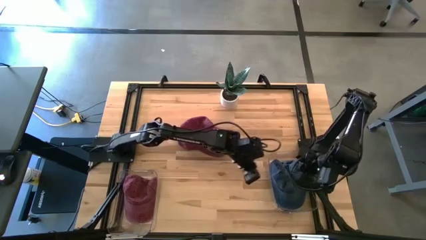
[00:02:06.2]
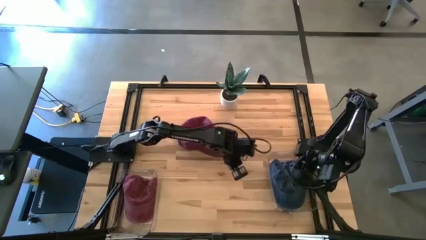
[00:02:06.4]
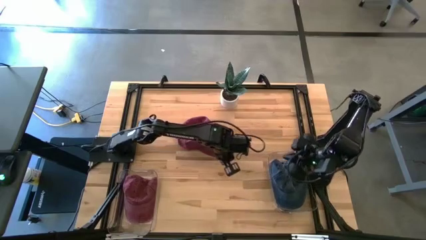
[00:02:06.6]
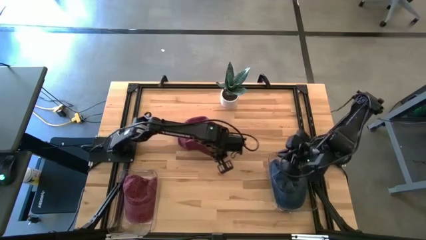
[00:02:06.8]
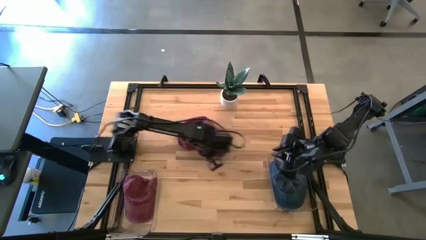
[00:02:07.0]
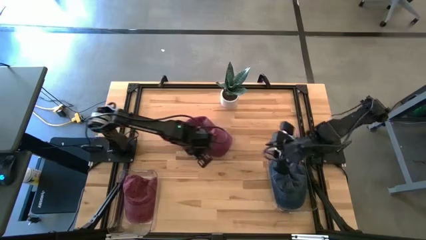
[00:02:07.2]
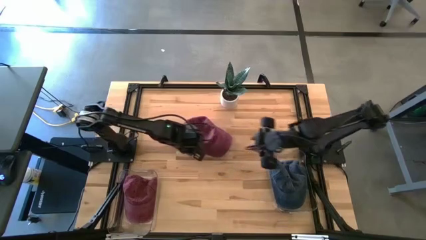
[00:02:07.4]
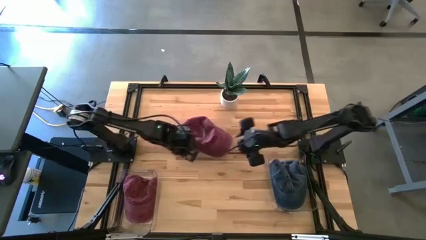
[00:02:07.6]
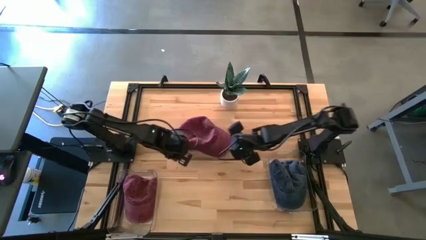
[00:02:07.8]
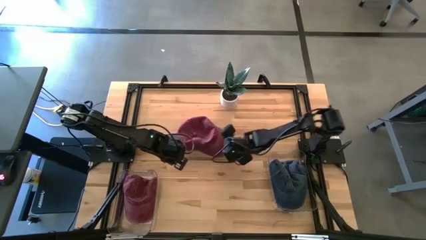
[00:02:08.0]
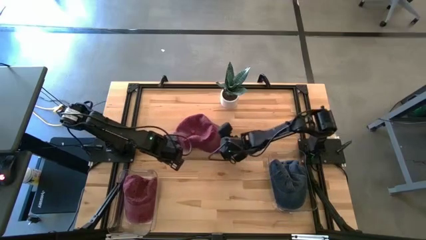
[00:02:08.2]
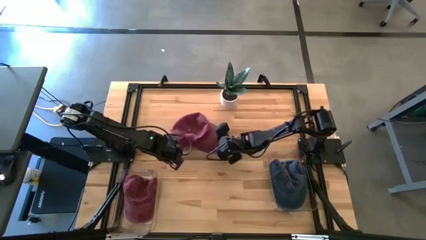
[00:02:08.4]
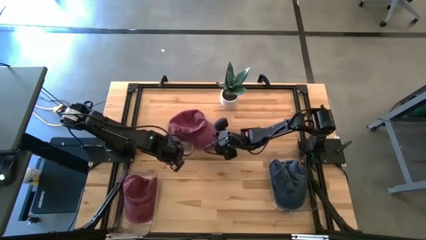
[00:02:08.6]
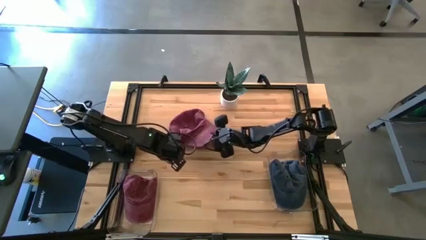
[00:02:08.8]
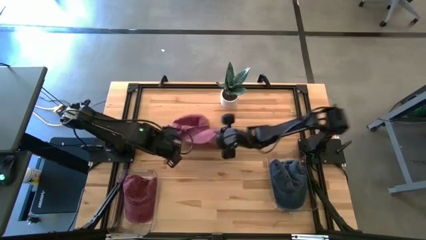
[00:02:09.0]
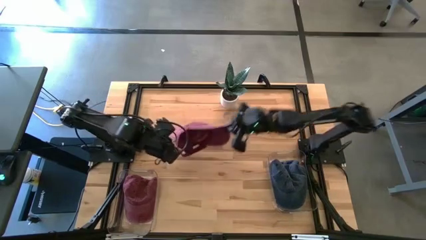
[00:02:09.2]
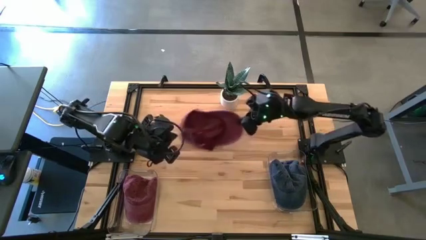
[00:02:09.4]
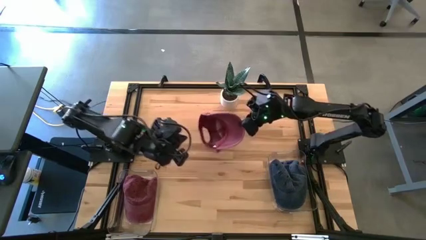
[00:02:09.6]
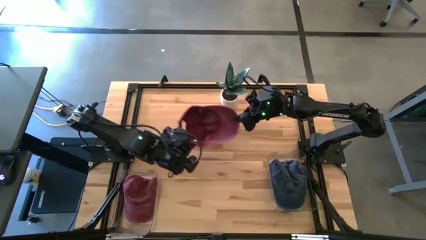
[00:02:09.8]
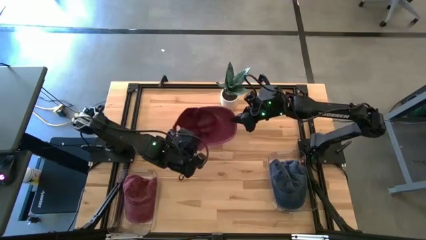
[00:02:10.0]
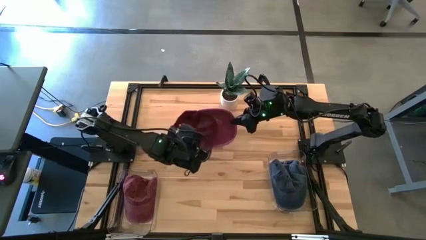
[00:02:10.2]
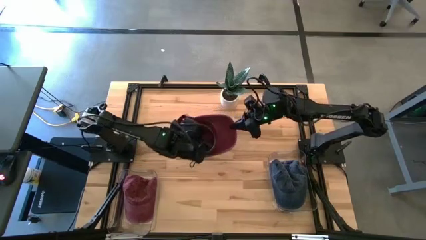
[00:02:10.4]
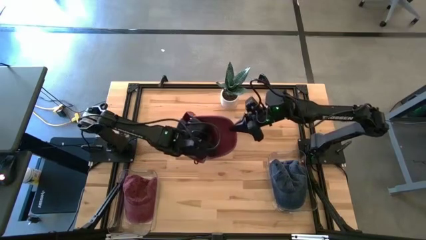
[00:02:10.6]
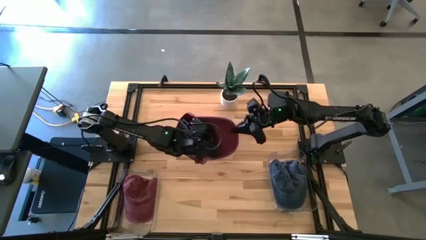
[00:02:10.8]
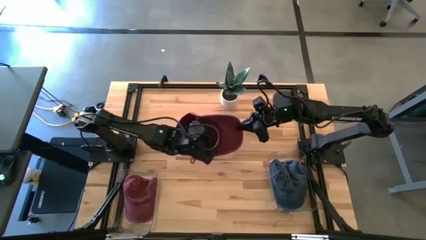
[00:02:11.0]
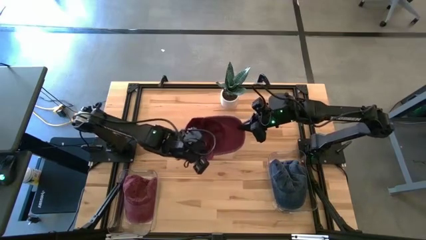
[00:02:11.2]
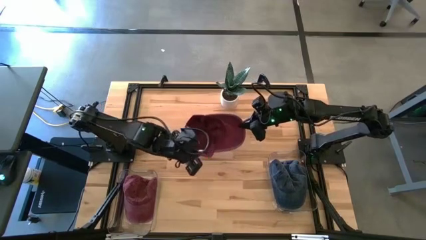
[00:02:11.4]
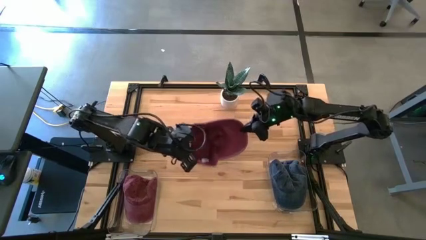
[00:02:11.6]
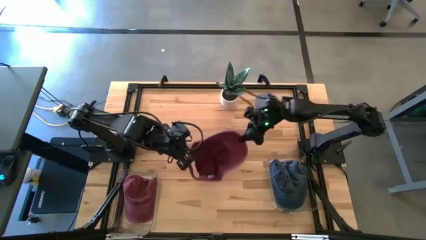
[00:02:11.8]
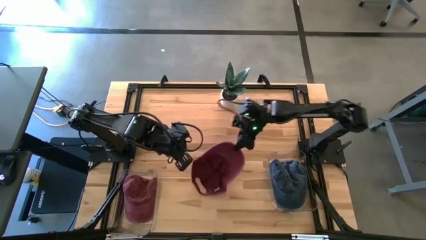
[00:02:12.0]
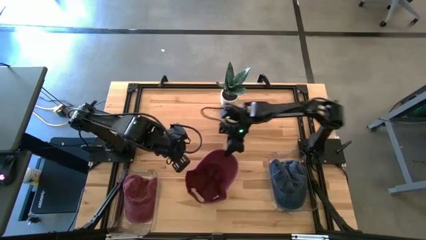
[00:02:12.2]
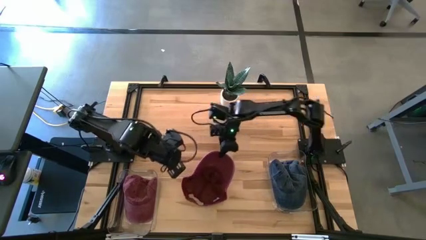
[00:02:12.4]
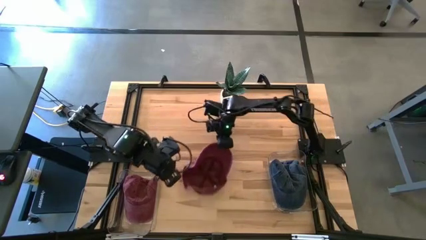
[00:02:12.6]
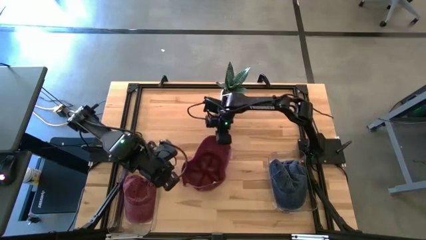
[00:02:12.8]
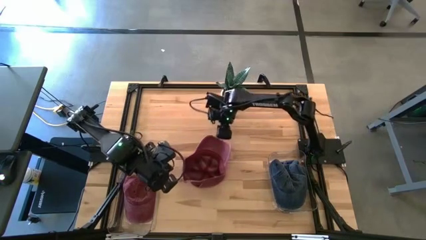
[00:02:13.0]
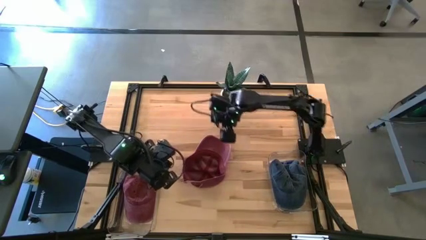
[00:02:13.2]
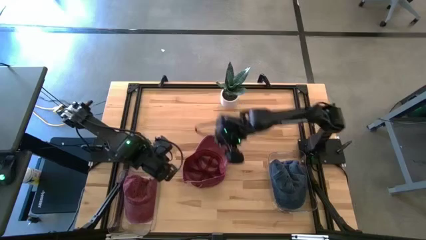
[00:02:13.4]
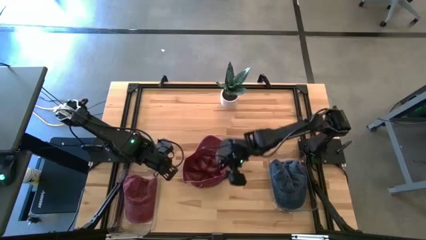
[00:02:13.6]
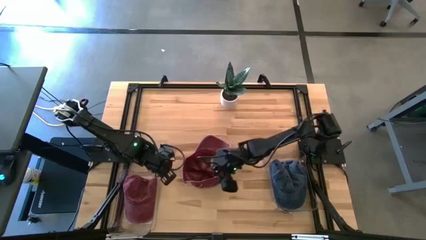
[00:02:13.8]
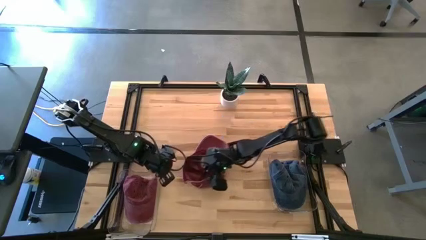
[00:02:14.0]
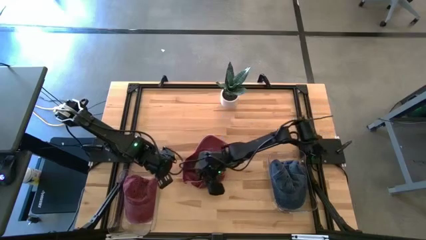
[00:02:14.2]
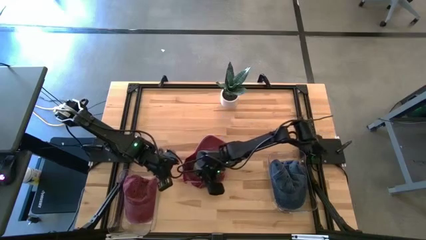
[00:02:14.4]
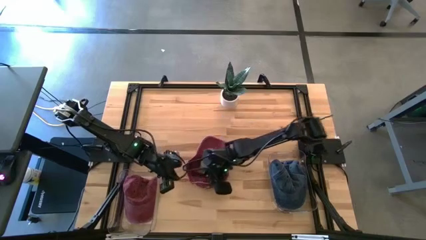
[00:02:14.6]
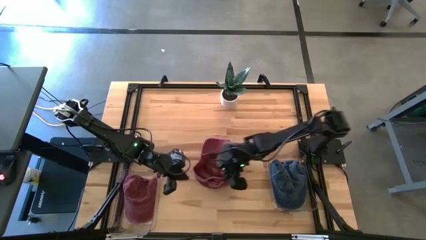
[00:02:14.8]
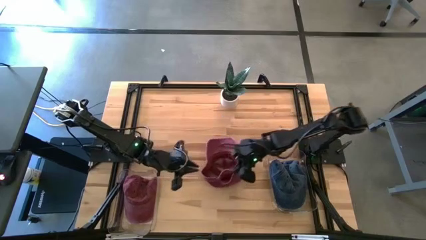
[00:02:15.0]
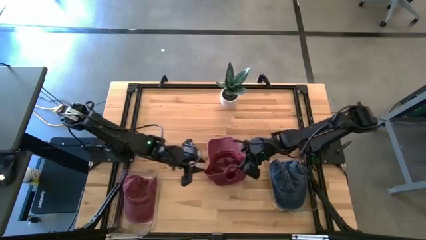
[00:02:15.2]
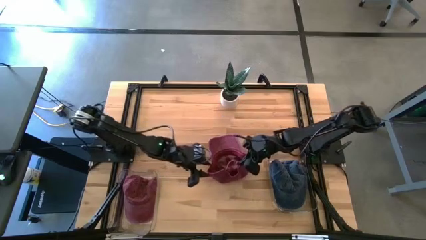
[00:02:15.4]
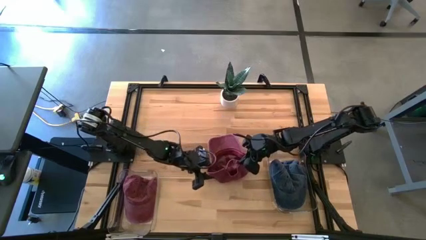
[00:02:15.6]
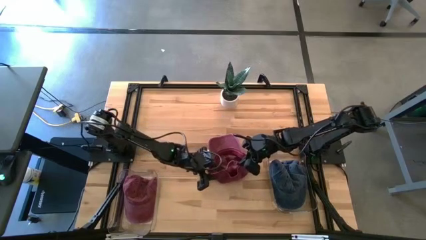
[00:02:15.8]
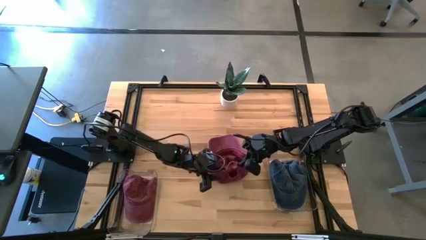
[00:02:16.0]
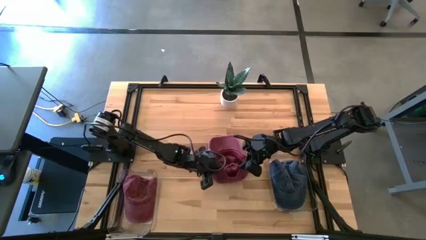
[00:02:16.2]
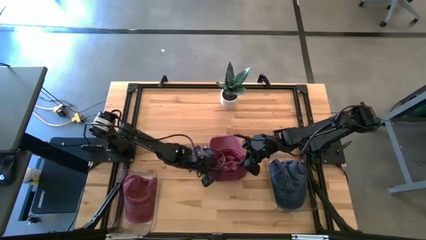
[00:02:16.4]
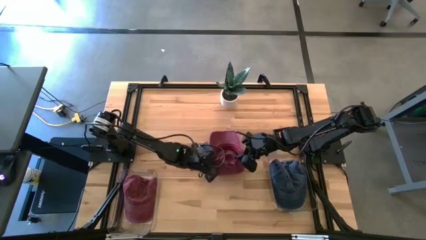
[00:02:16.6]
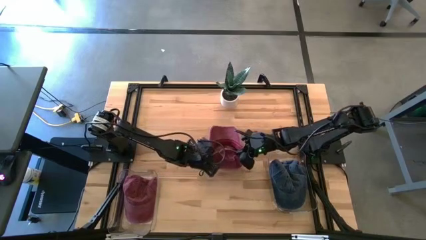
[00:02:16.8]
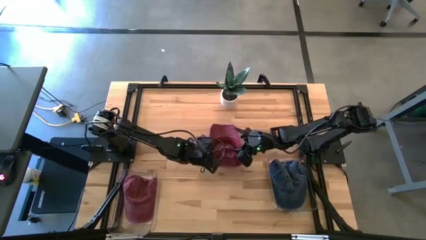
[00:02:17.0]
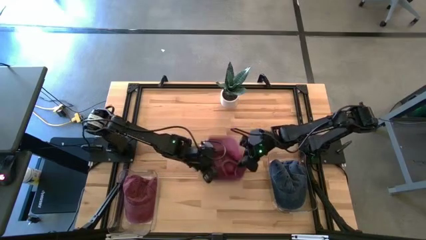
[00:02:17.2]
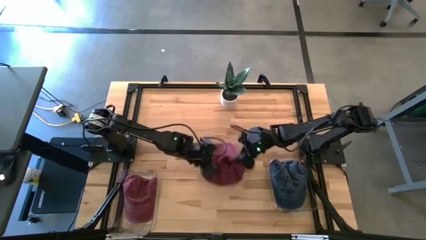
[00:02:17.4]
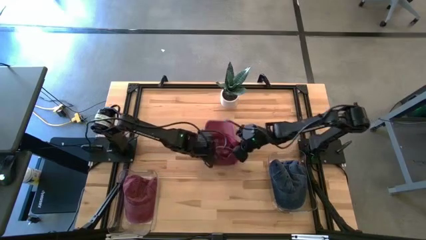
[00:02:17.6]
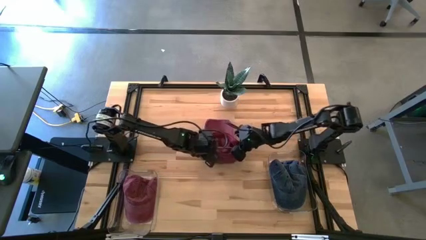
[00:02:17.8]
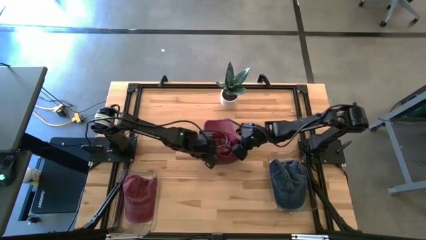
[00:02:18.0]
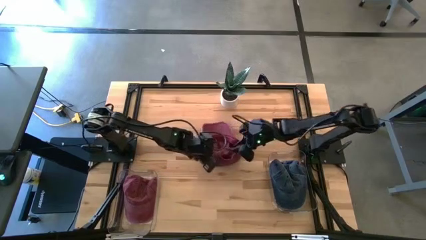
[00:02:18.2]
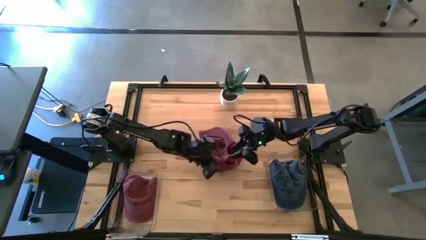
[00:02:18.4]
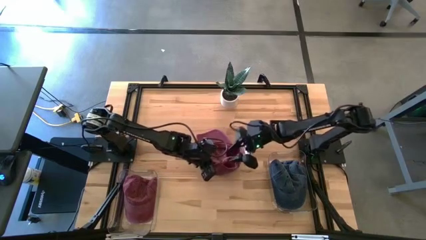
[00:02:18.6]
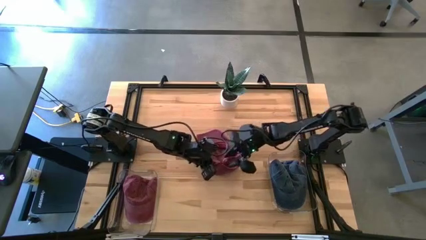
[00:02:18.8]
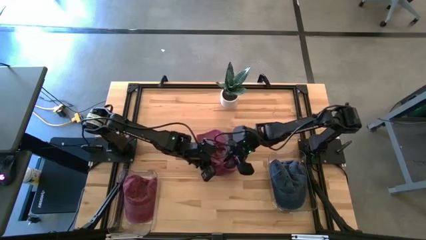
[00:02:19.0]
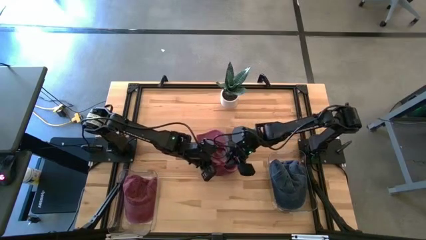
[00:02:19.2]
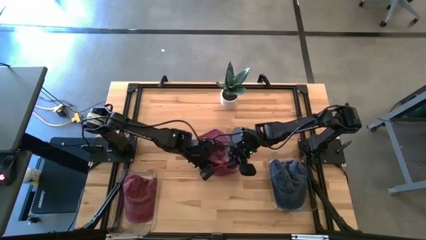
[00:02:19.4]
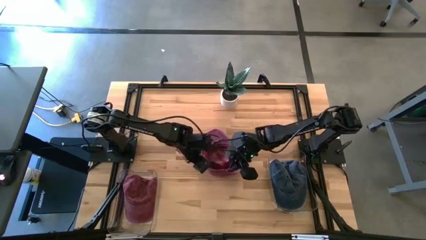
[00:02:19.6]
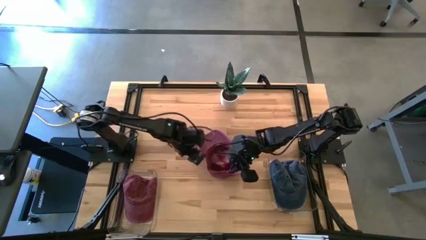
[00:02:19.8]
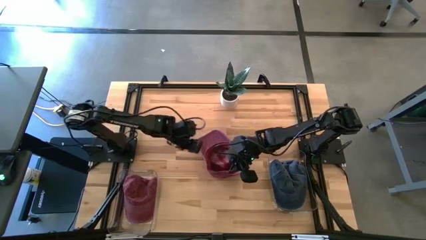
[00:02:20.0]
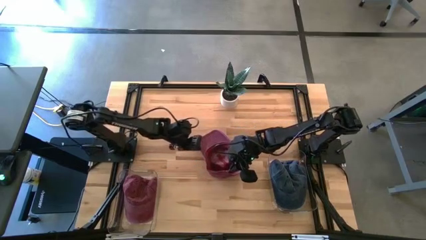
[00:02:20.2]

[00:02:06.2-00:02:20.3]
Task: Pick & Place hat
Put the red cap into the left transparent bin
